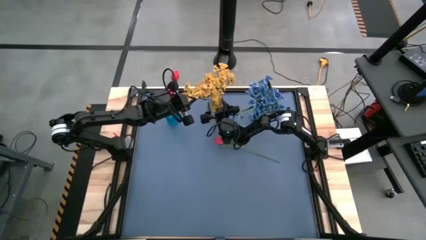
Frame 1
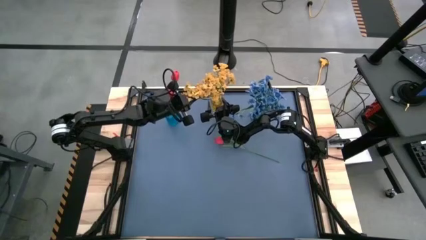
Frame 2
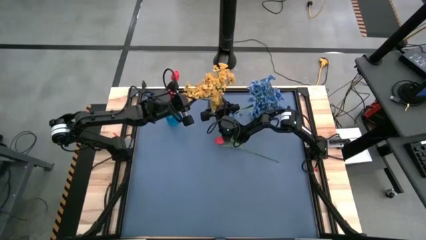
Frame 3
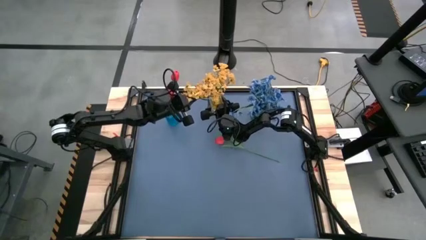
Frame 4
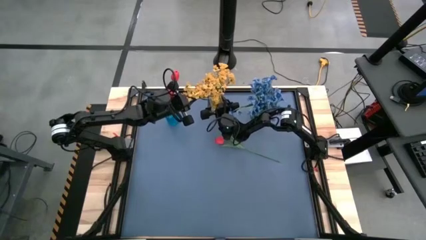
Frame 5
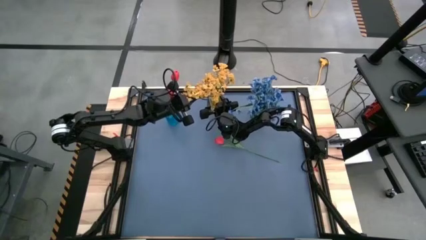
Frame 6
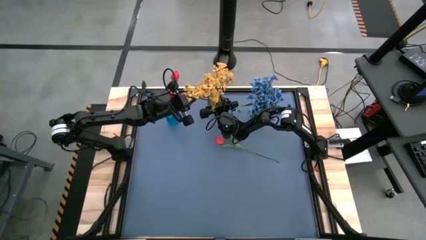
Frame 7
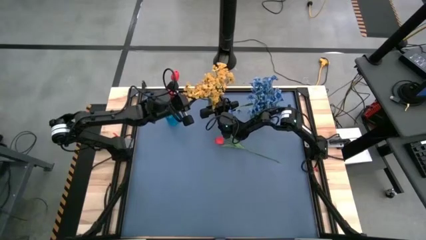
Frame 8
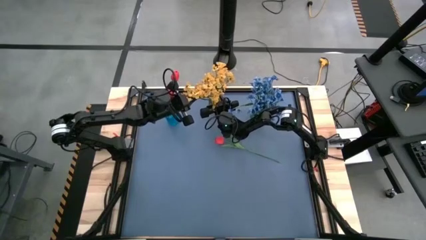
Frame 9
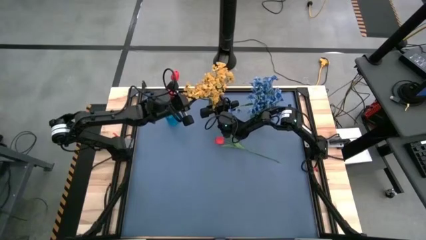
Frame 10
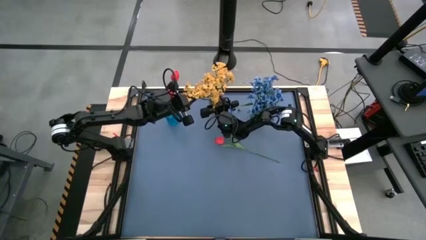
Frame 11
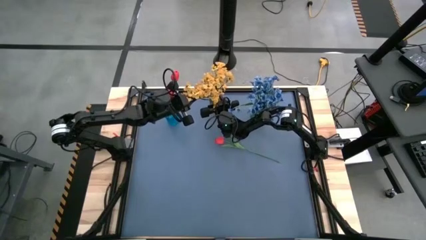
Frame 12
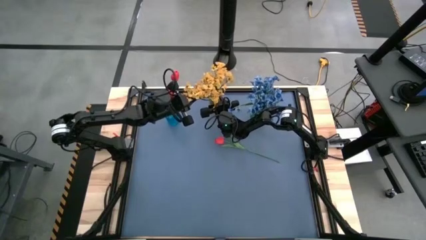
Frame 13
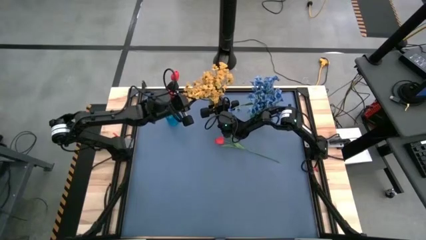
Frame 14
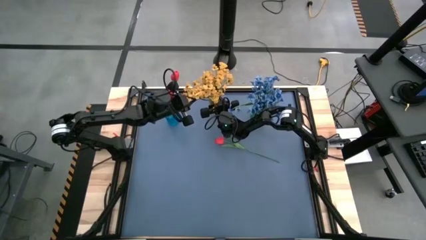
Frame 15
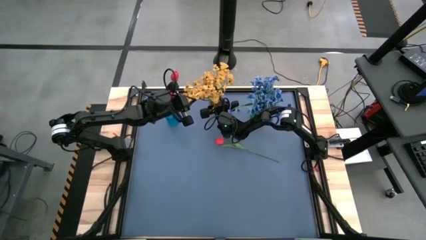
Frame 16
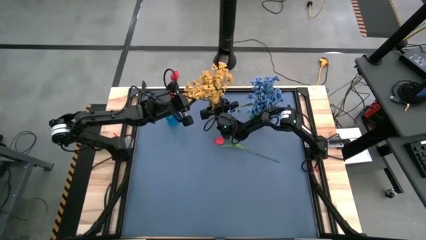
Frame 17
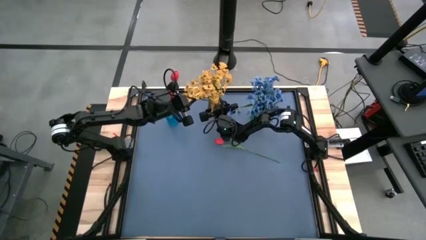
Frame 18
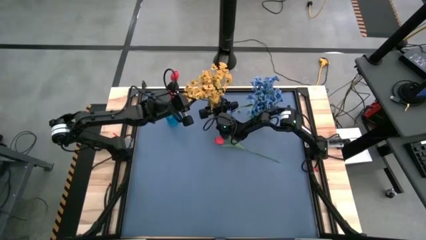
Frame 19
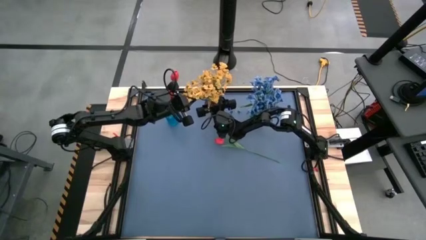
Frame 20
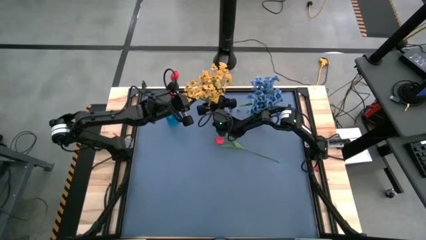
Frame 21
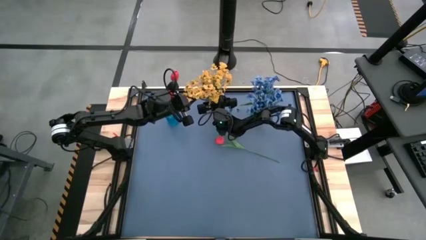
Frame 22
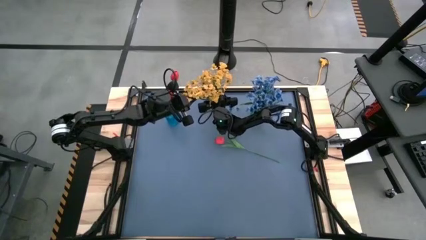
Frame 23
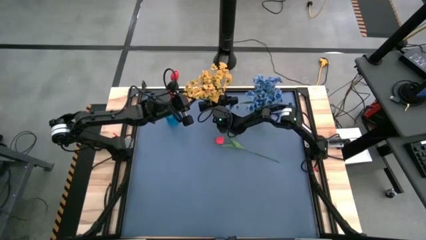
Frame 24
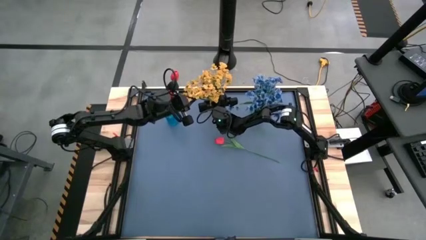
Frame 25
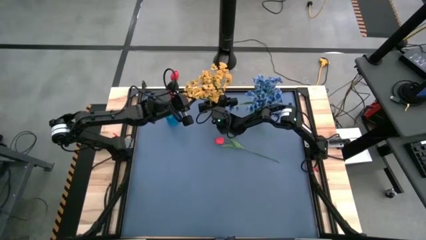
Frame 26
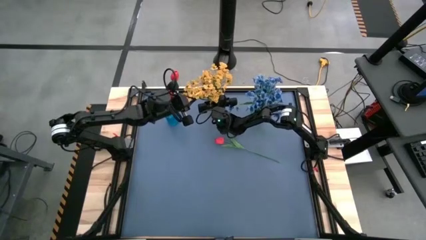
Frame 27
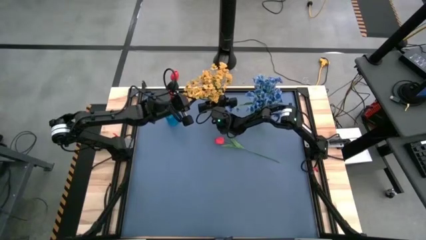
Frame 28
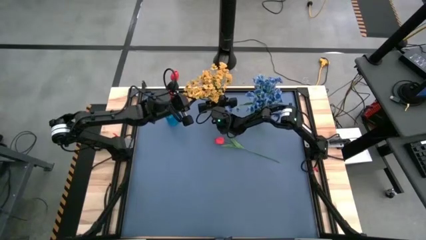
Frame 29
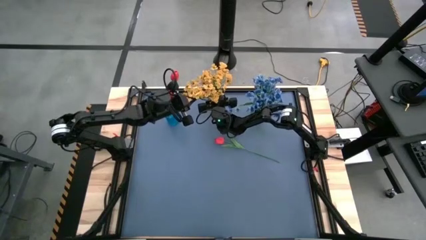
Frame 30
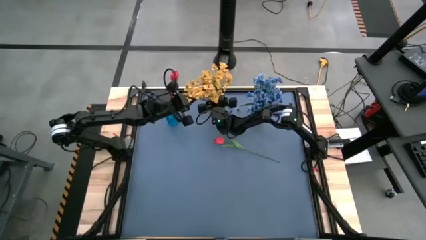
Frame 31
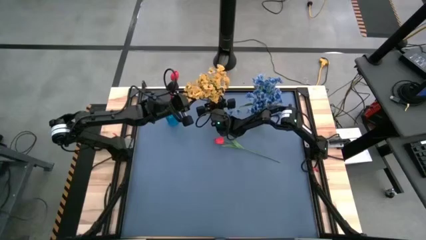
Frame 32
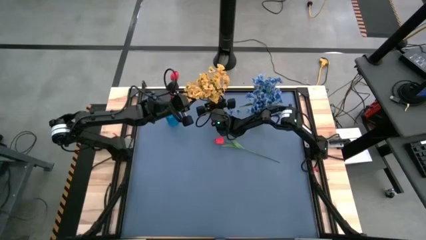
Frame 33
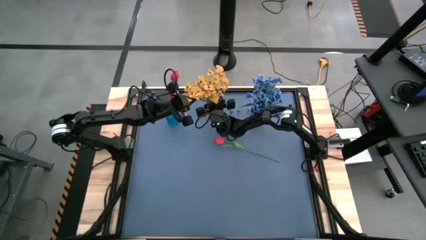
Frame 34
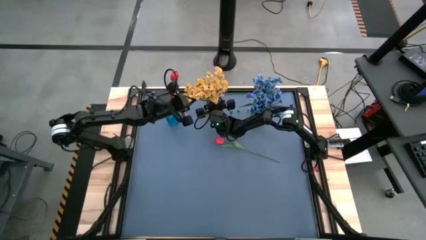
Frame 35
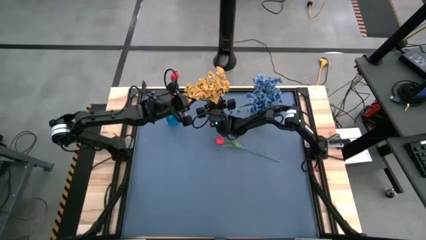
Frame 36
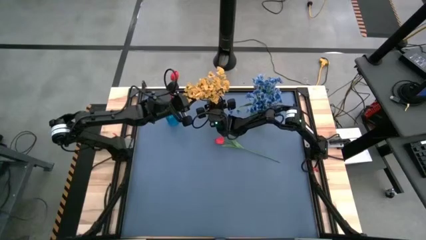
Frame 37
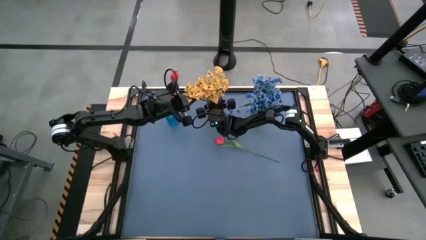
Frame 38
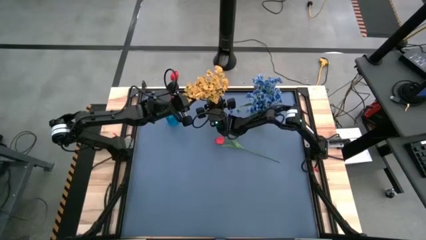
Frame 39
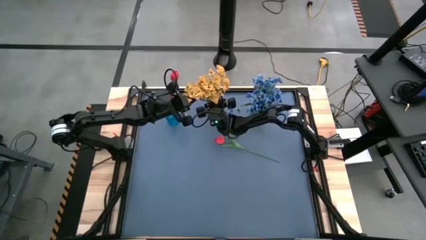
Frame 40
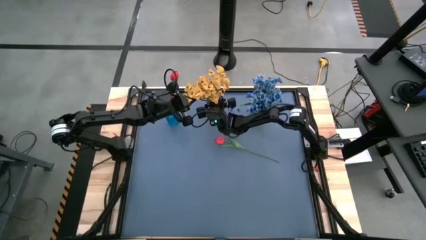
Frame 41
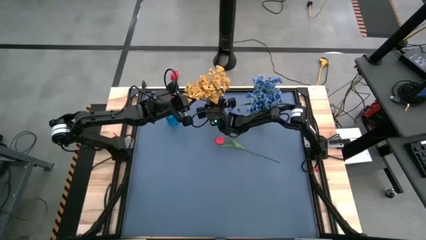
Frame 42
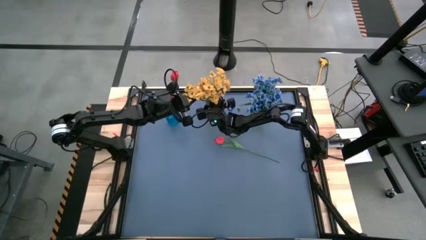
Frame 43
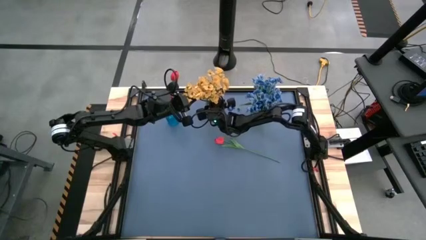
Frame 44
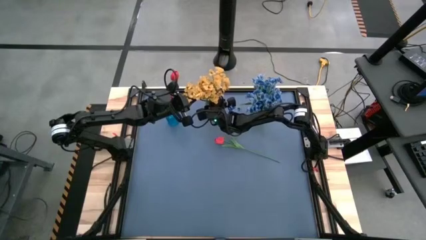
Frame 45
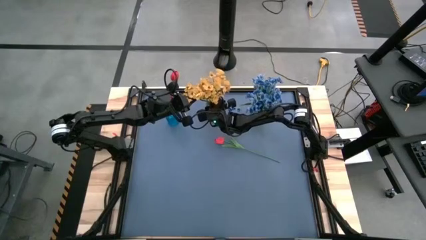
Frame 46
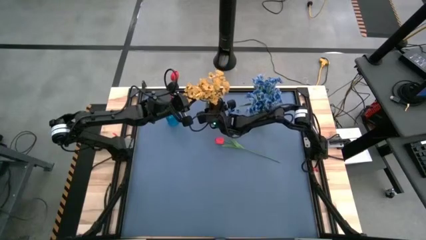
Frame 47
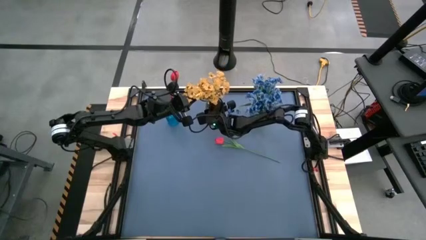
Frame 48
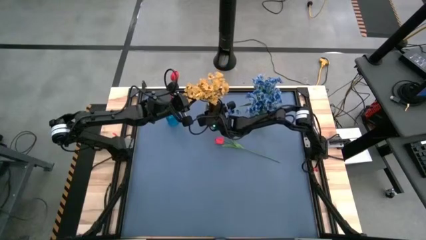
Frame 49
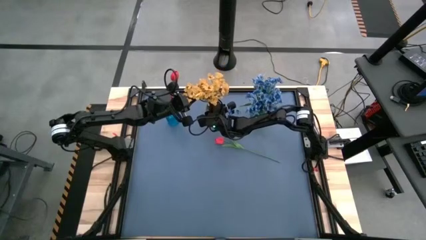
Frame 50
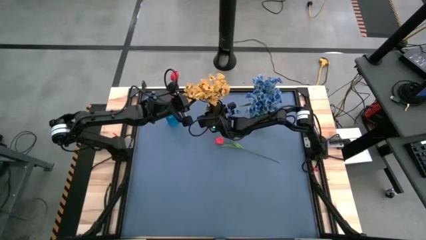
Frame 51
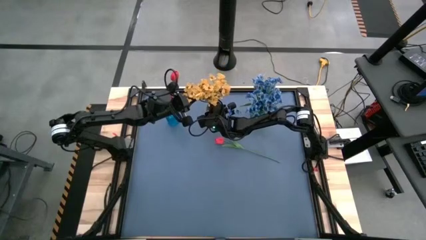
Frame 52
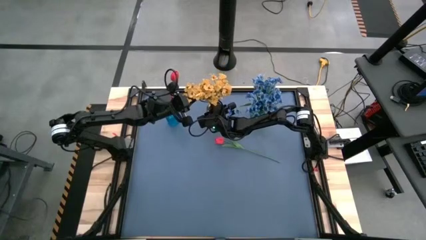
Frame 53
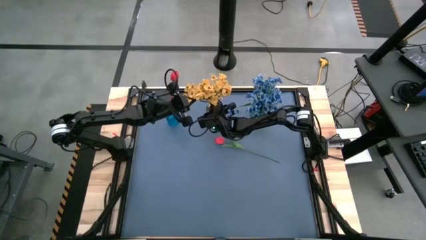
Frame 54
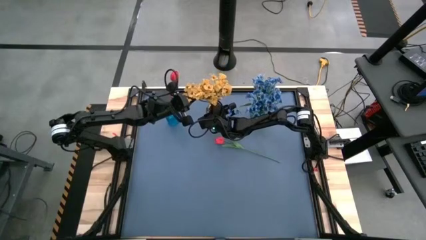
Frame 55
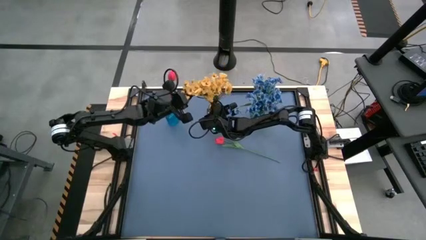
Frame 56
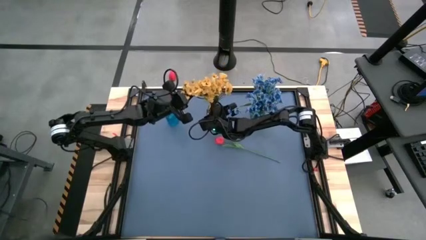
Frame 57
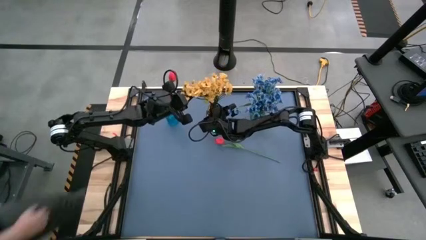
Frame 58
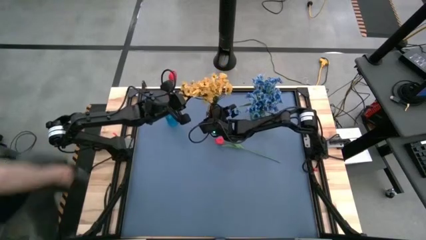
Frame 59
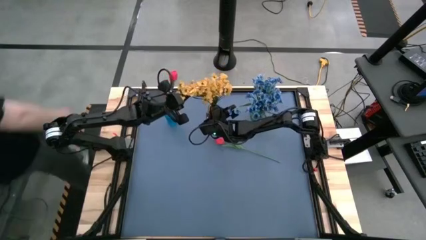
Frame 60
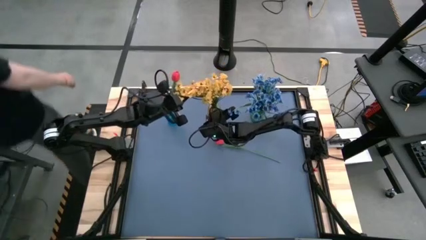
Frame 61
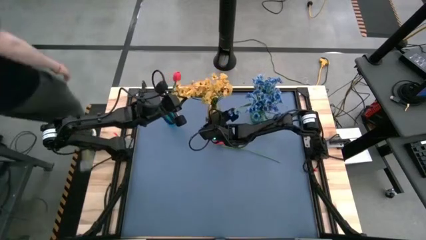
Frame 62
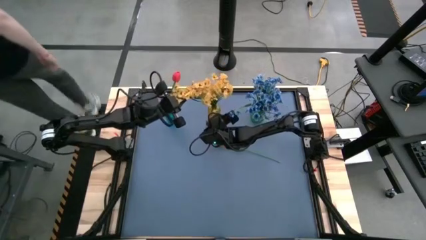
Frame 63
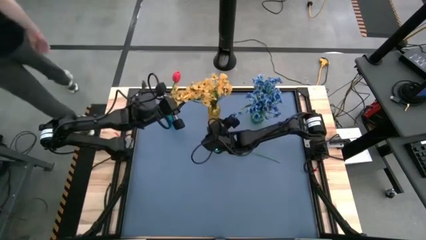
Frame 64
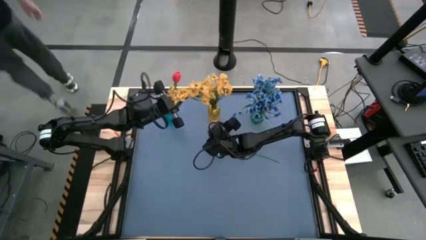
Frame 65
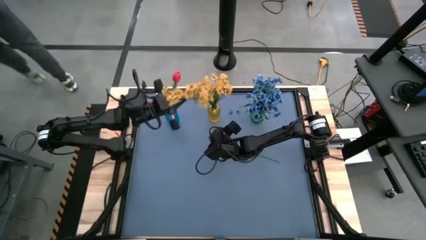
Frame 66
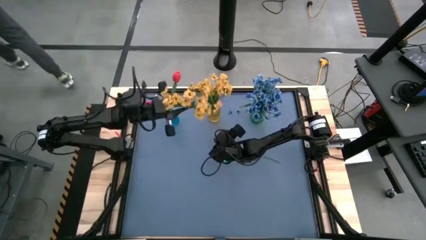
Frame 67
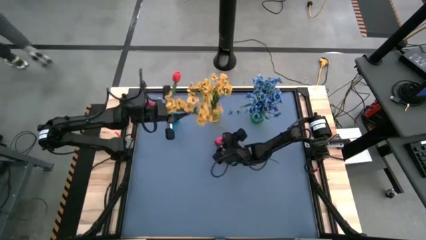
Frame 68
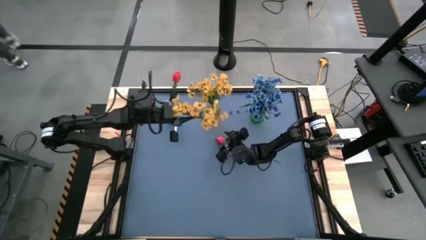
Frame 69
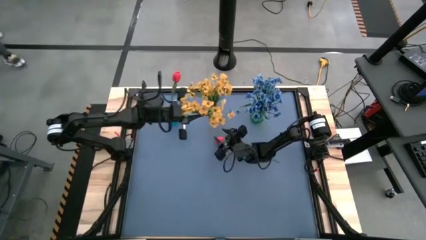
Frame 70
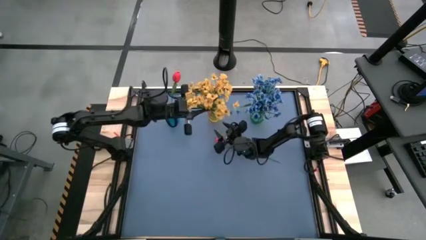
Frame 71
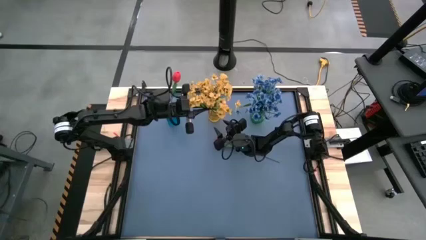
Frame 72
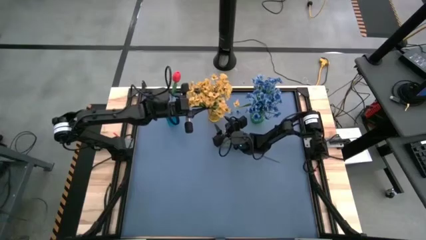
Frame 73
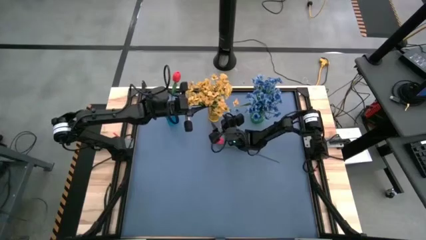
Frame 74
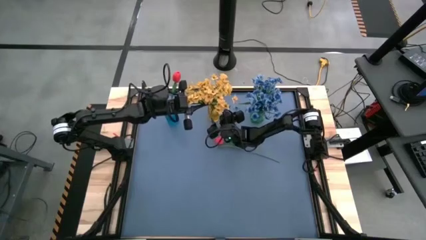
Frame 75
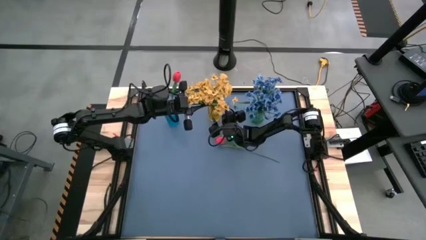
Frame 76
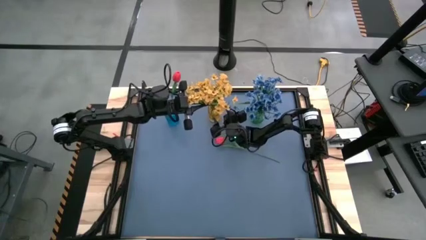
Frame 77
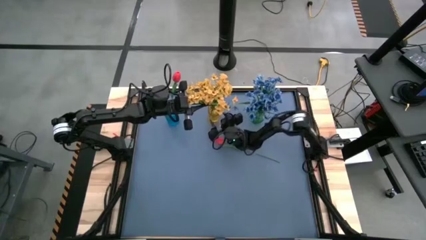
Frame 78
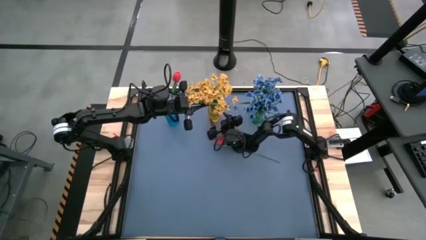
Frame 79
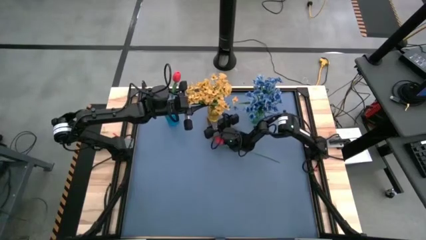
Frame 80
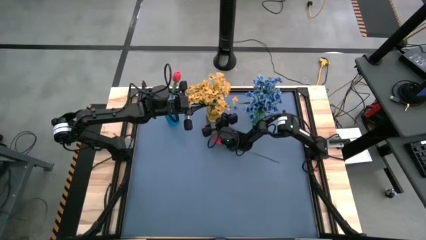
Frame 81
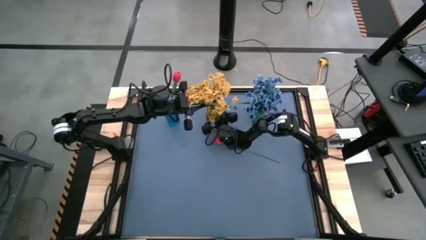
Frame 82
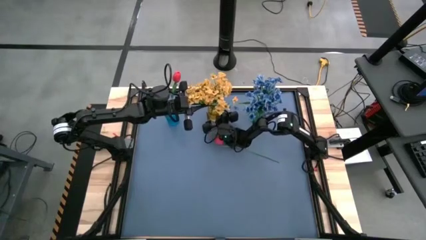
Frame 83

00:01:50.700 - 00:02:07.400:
Task: Sort flowers into vase by color
Put the yellow flowers into the yellow vase
